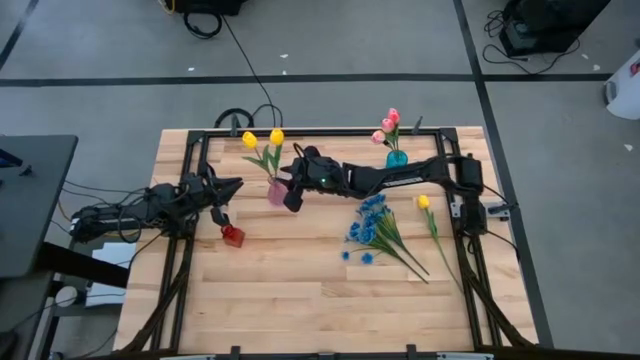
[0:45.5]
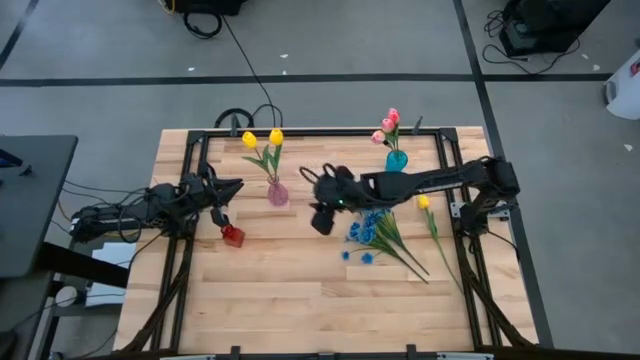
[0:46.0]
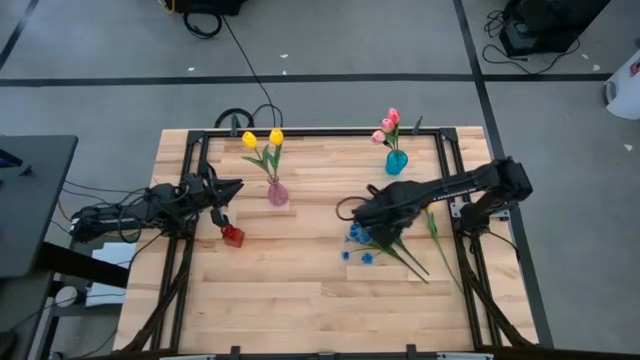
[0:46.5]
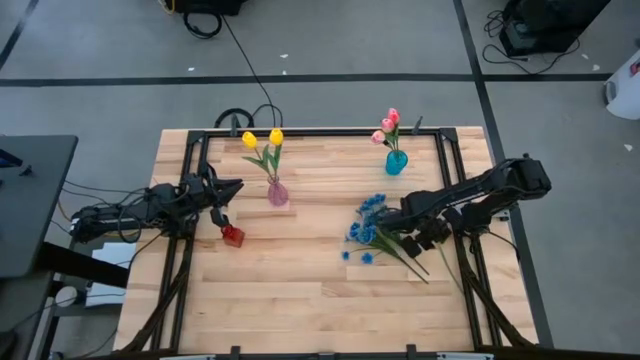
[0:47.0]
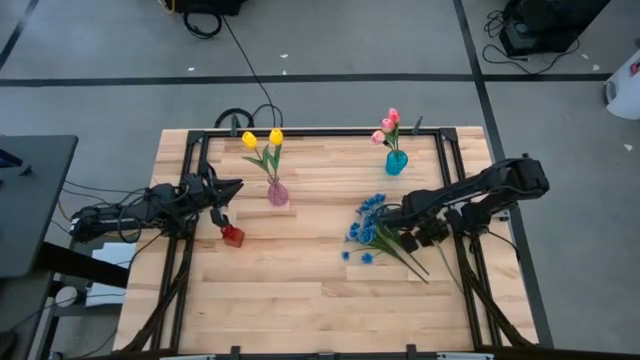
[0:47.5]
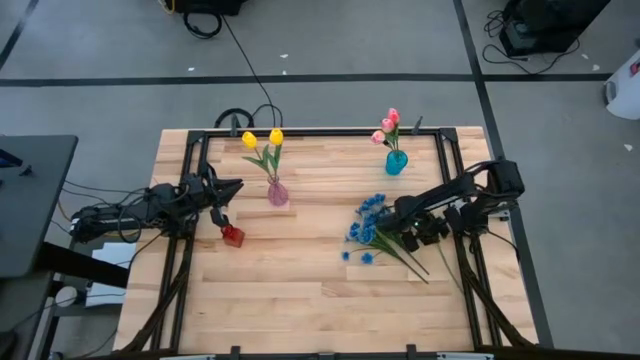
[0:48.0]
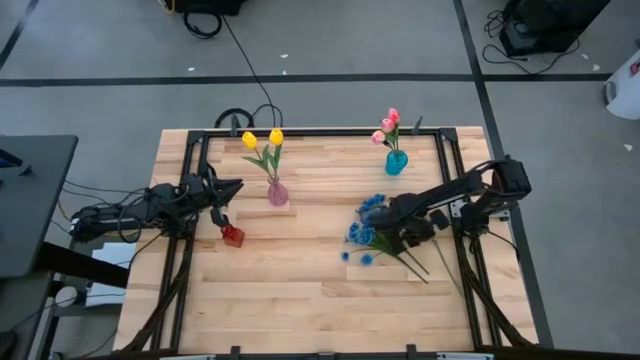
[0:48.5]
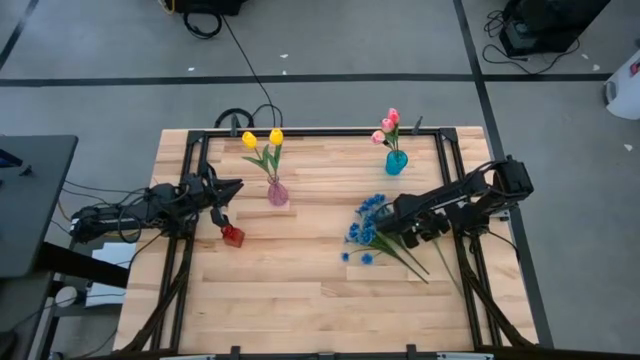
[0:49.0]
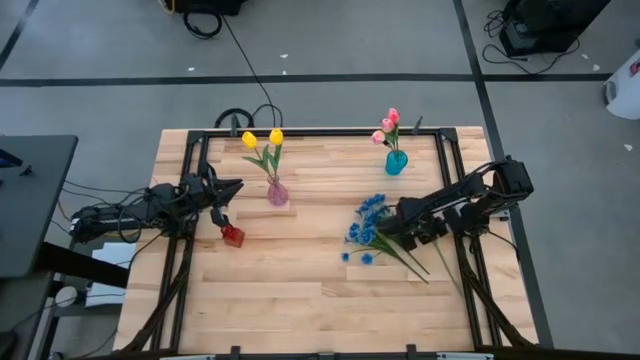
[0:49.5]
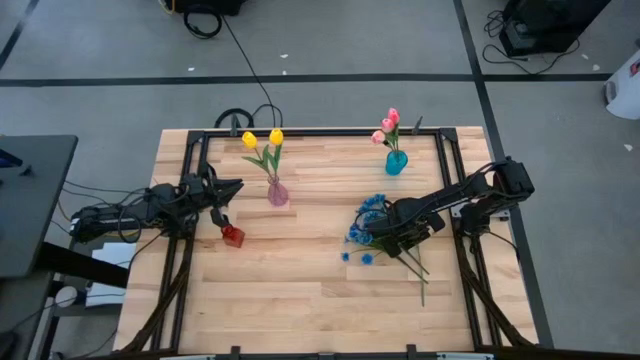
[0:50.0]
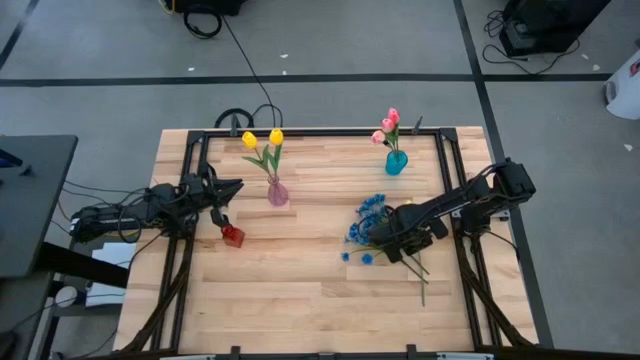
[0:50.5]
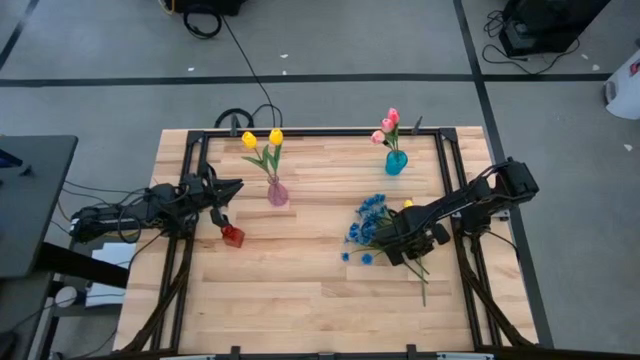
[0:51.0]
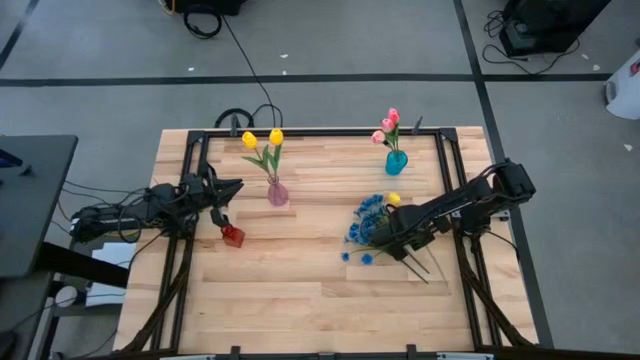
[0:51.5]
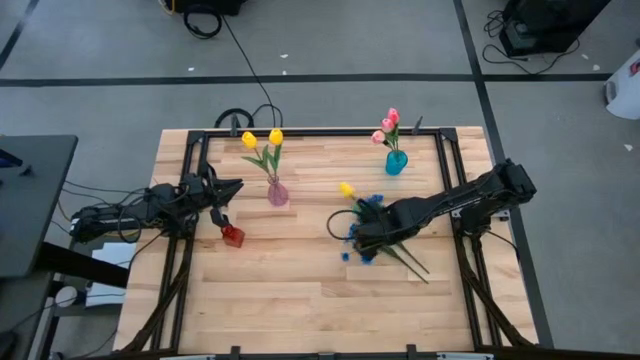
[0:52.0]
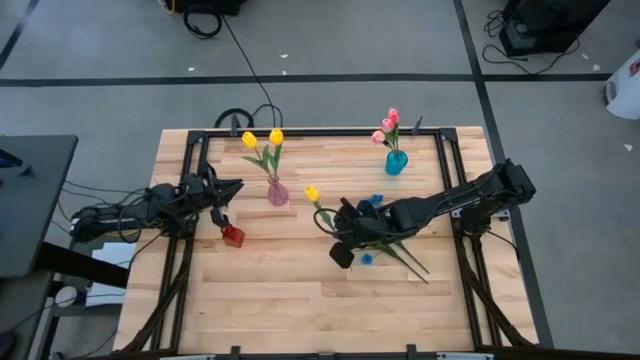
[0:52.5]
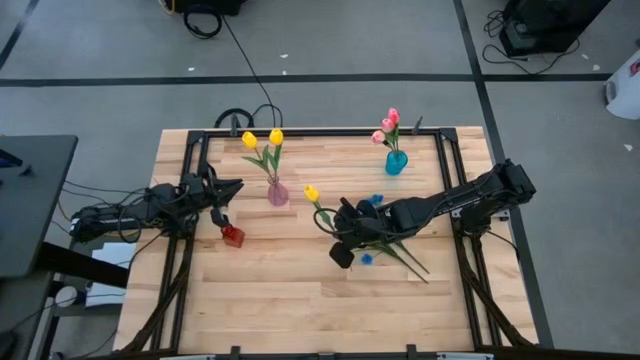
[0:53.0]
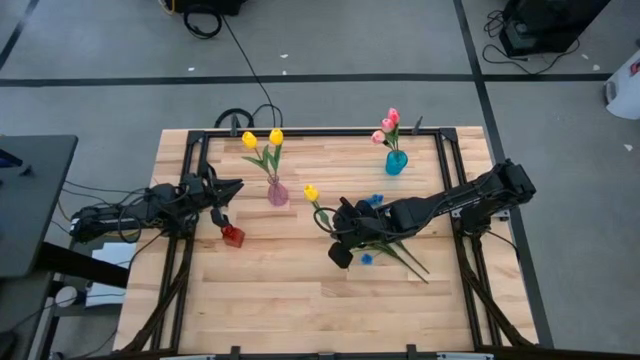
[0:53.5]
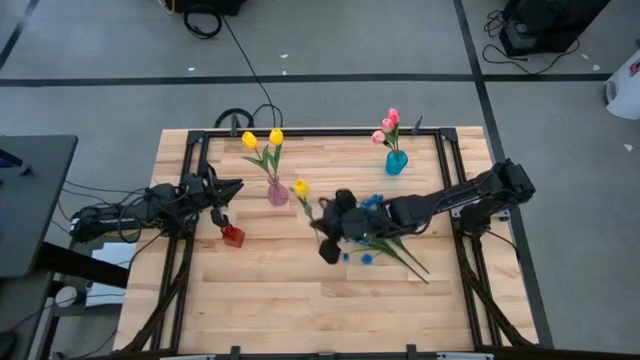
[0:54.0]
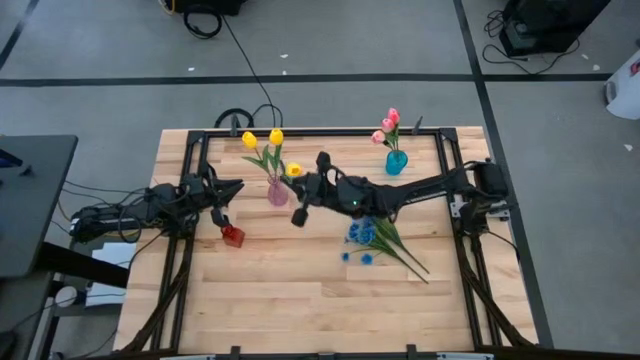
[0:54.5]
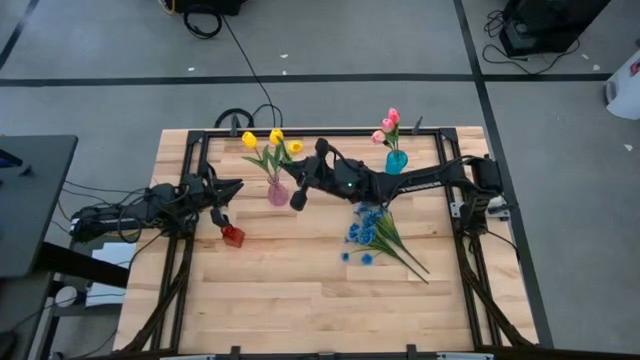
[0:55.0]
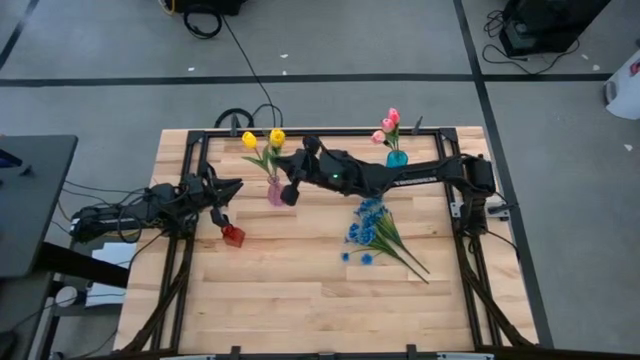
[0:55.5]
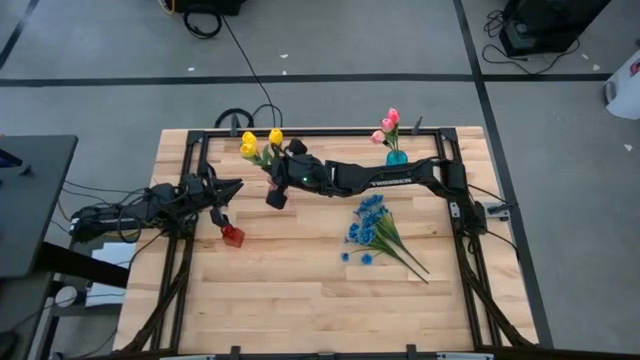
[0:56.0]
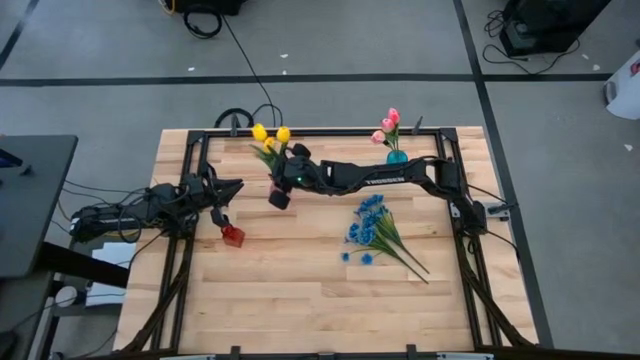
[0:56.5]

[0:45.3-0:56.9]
Task: Sort flowers into vase by color
Put the yellow flower into the pink vase

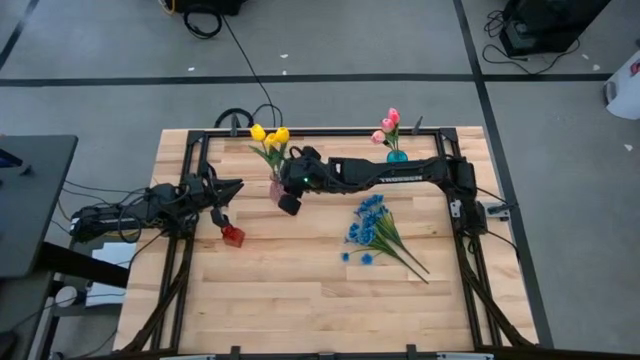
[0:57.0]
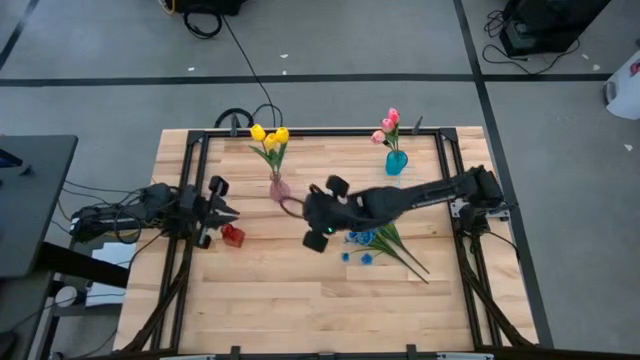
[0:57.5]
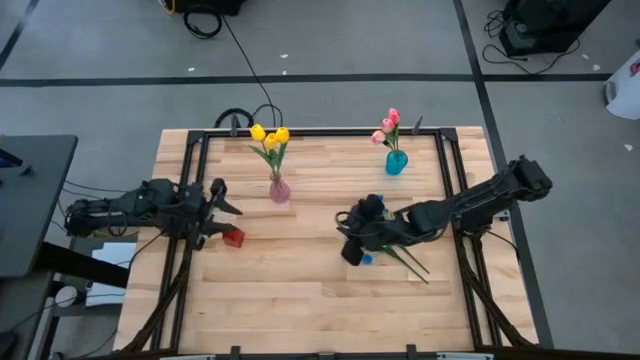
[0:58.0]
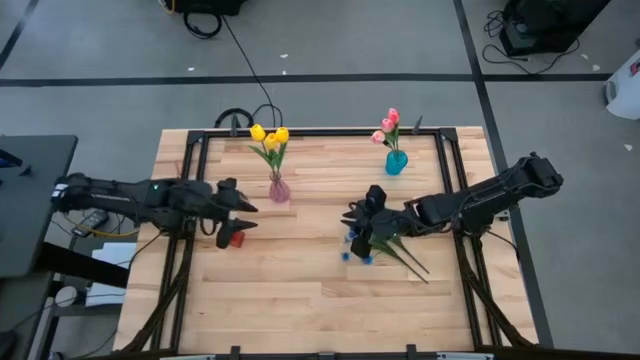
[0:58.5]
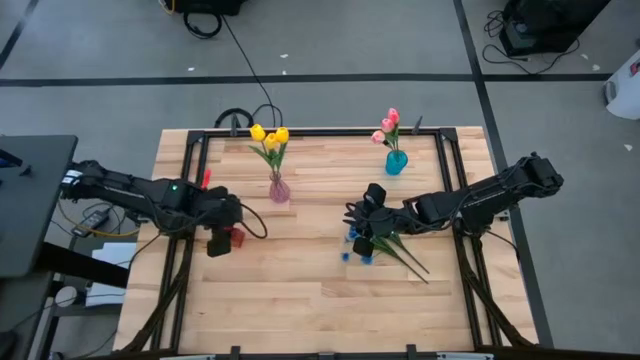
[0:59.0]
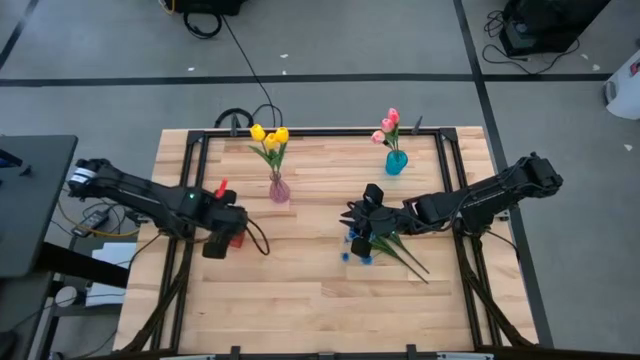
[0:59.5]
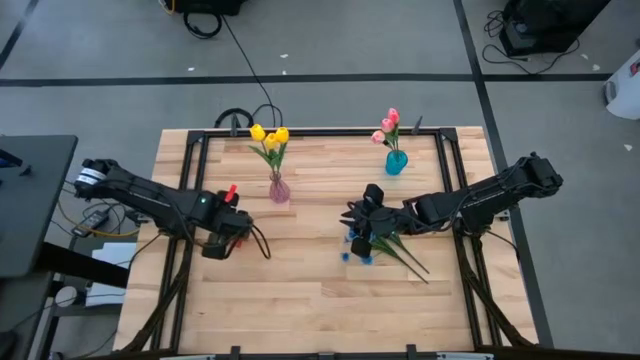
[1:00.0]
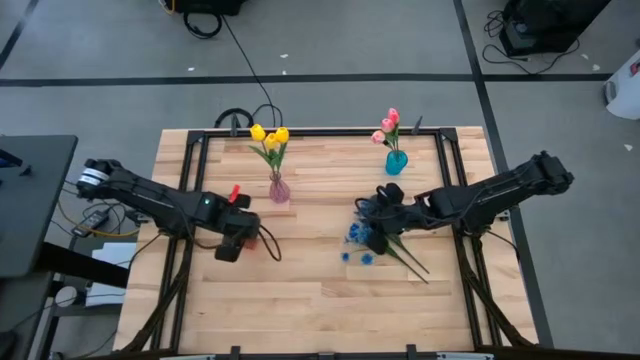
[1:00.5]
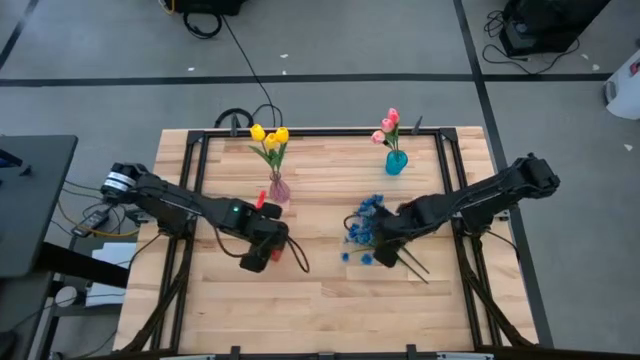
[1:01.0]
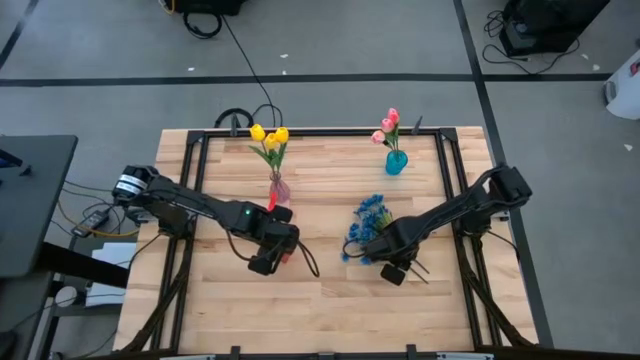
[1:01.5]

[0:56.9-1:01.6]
Move the red vase to the center

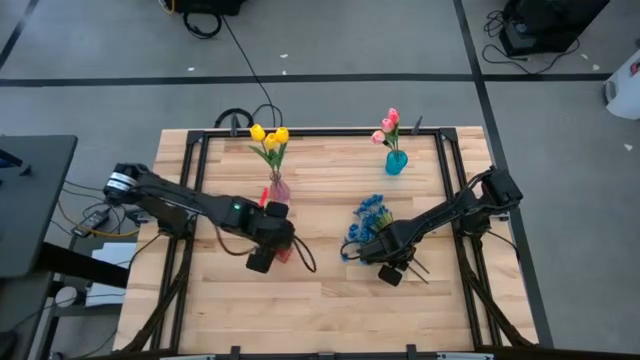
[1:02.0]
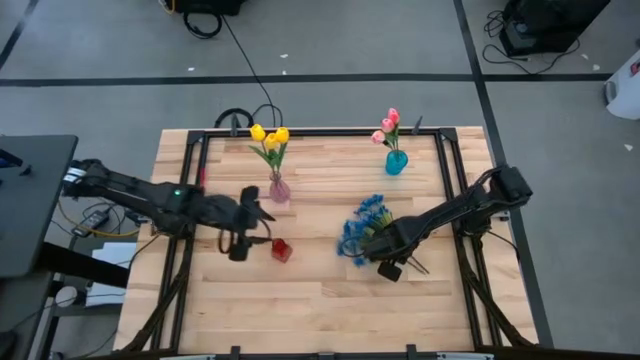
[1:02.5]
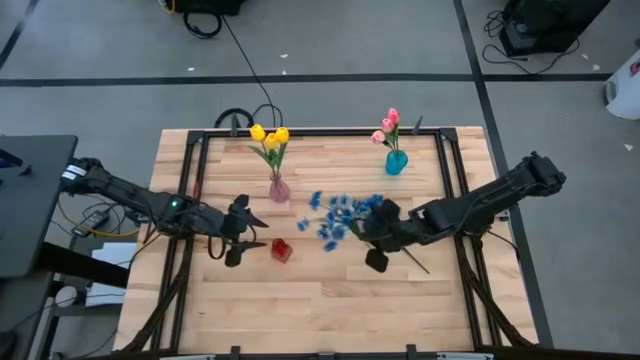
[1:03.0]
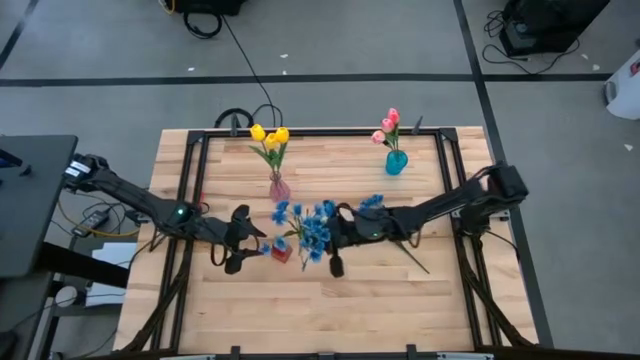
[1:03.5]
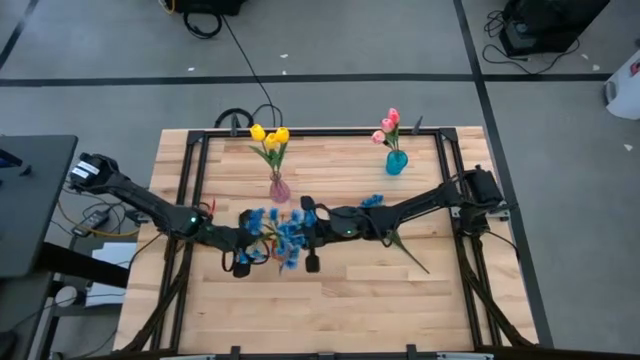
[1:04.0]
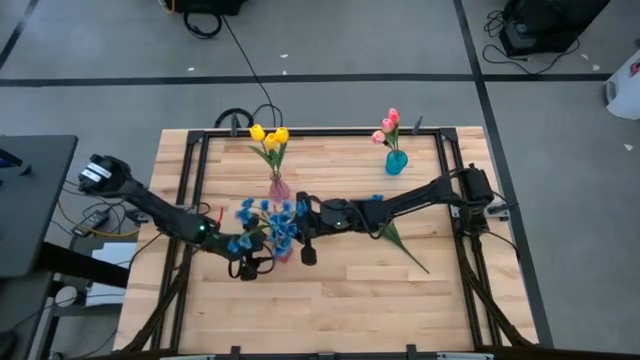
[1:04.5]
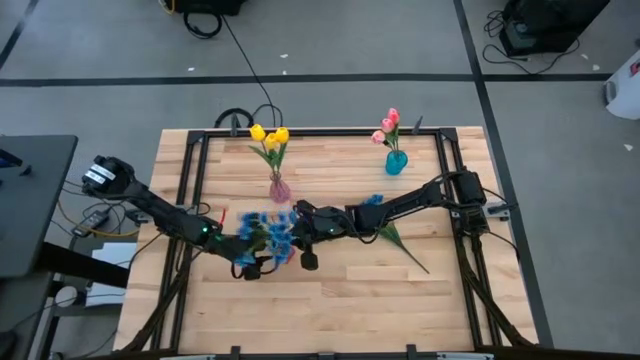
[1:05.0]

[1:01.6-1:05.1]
Put the left blue flowers into the red vase

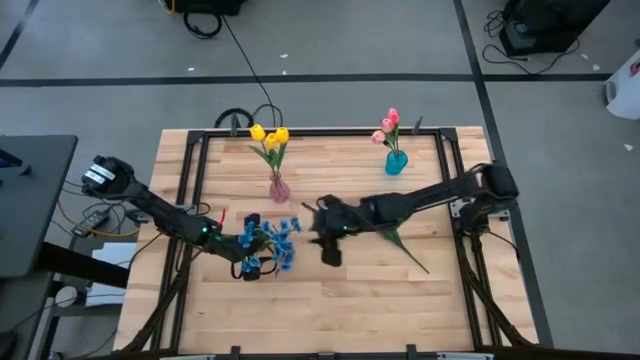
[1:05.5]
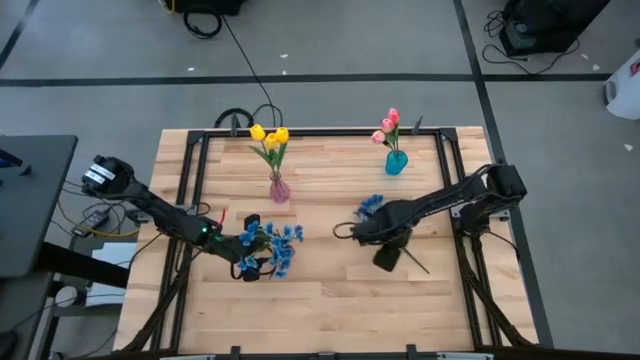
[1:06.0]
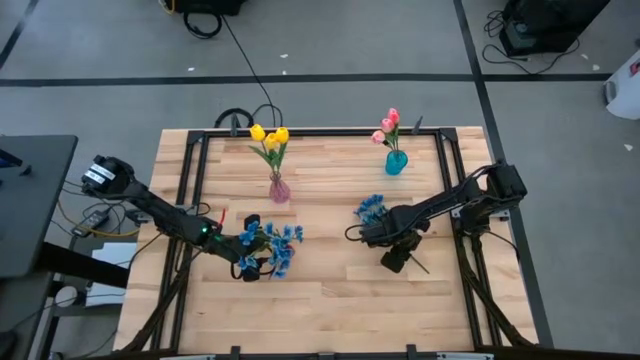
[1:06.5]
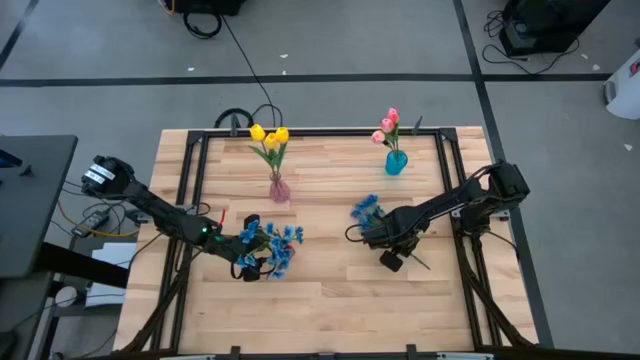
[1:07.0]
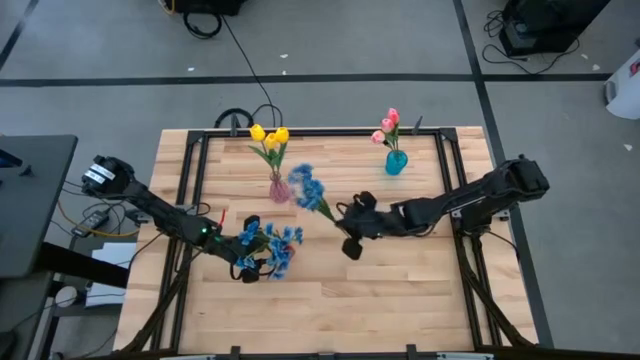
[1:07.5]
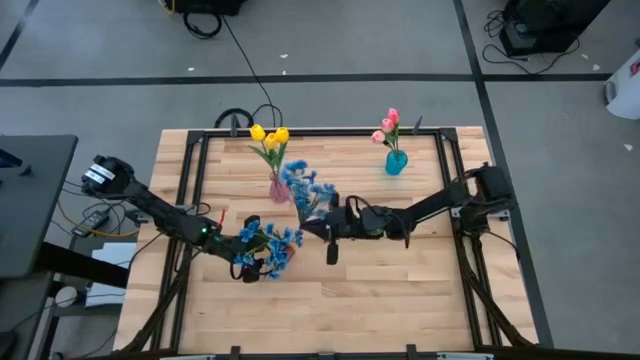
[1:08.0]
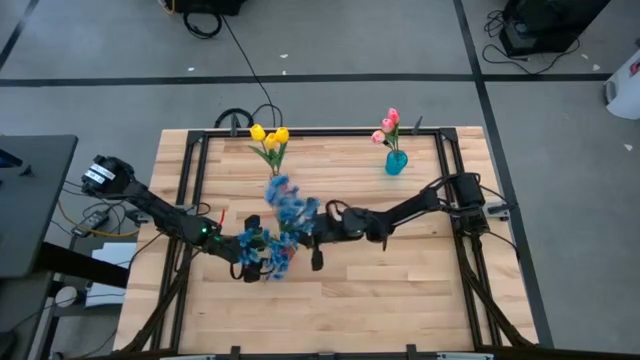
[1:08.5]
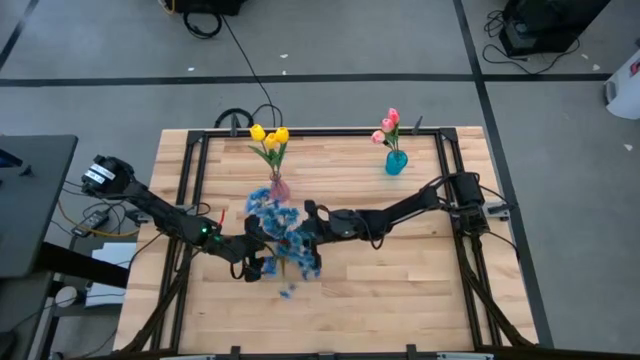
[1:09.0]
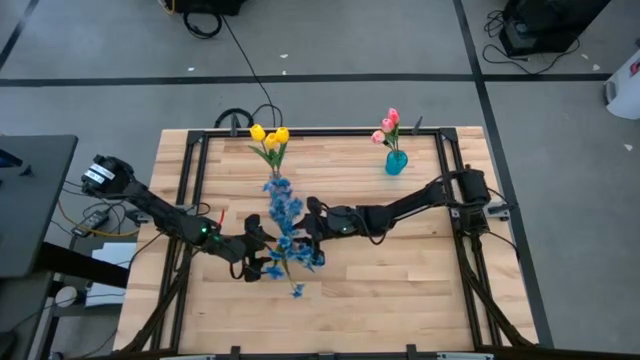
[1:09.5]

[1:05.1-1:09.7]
Put the blue flowers into the red vase
